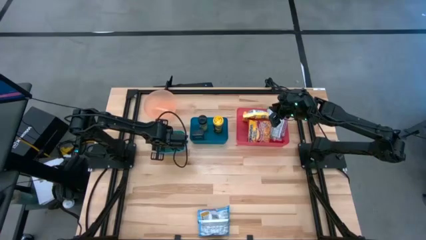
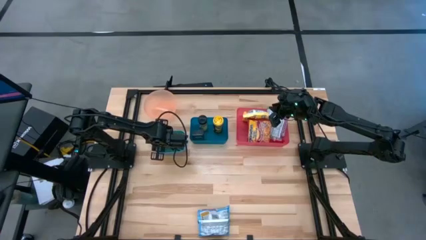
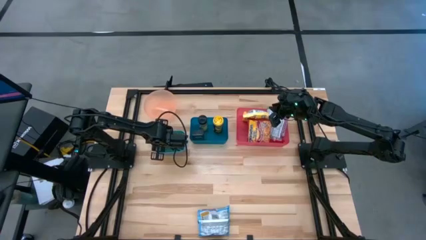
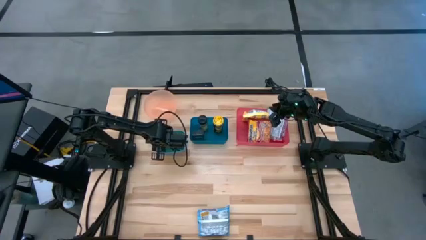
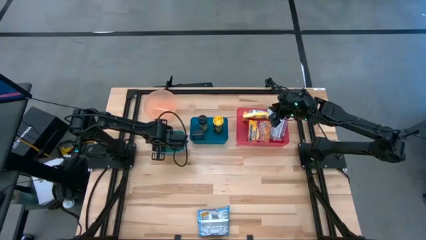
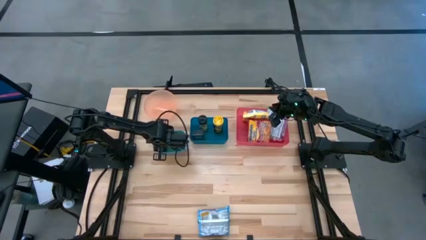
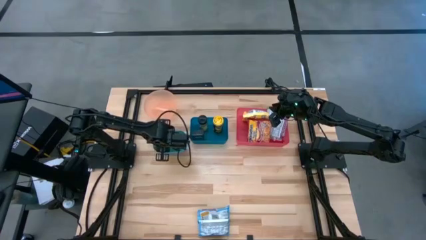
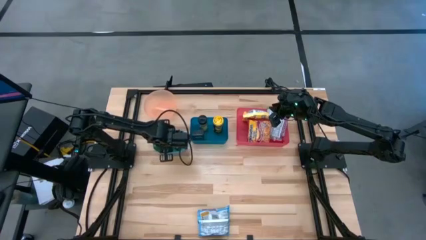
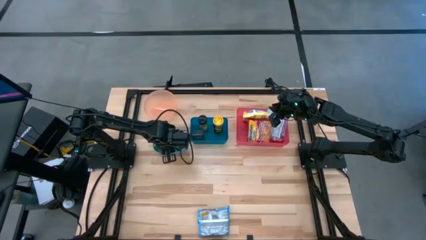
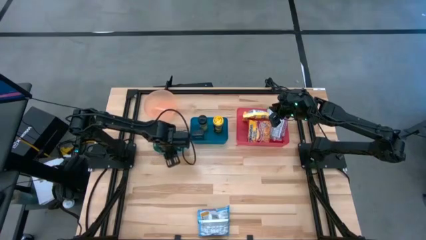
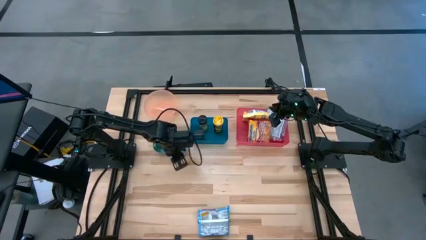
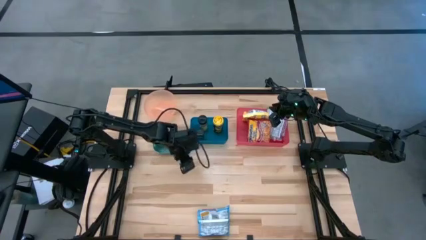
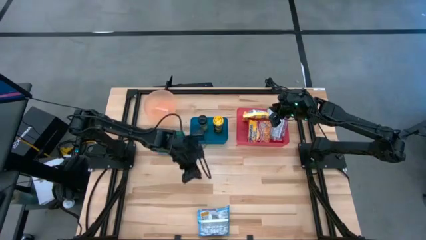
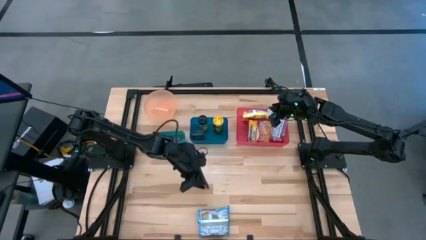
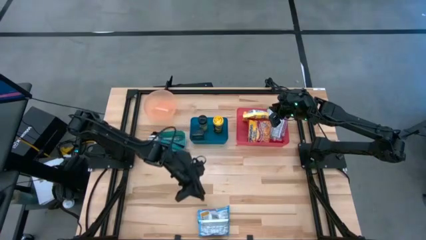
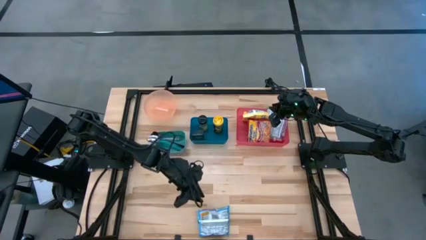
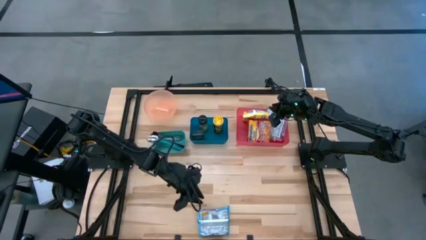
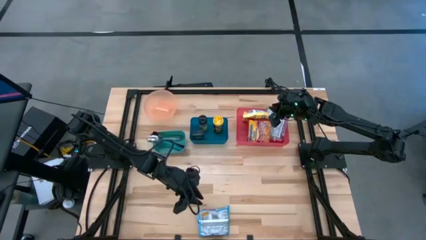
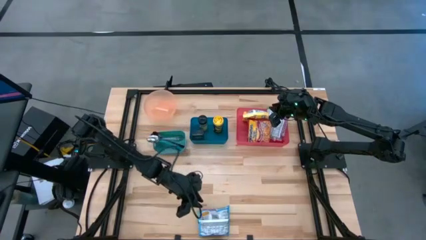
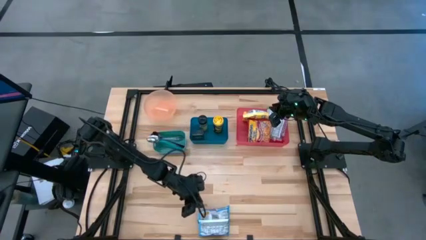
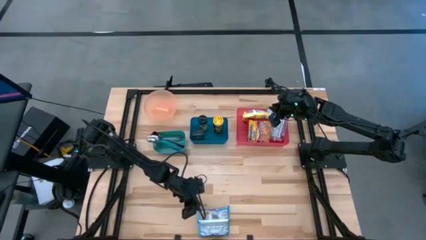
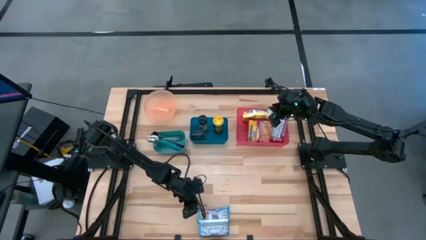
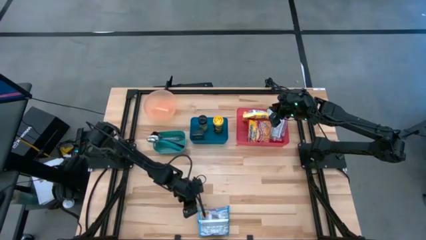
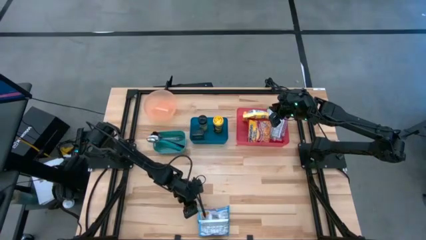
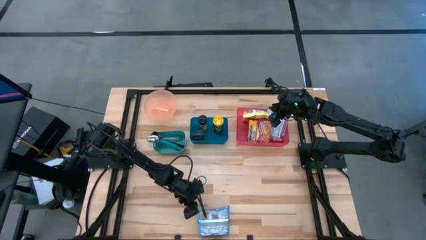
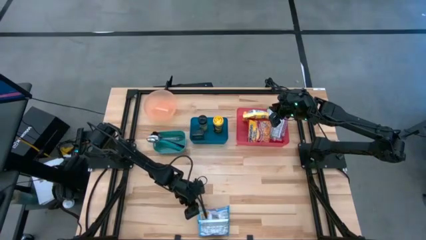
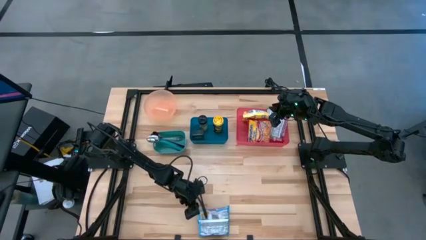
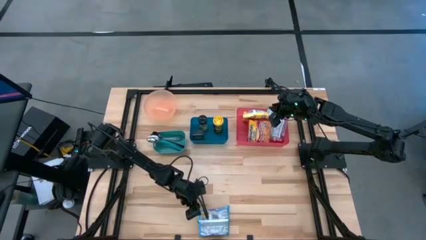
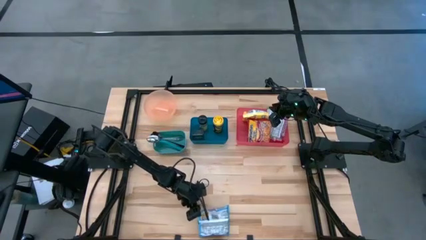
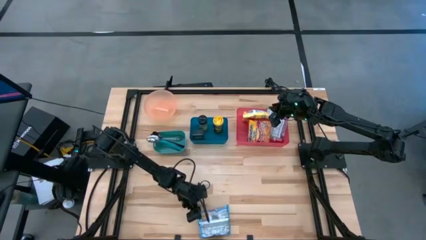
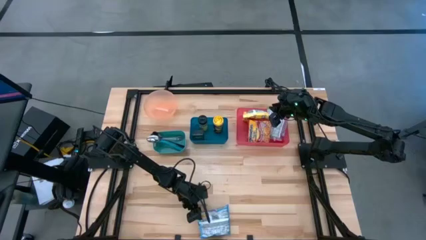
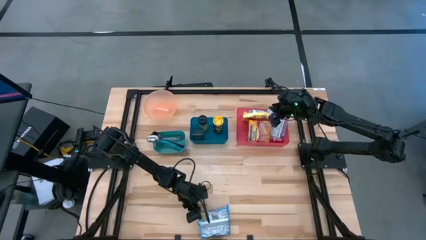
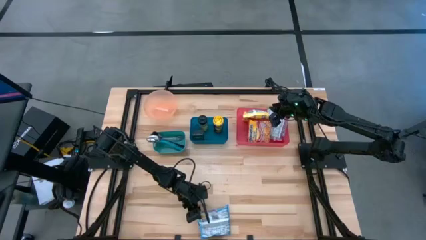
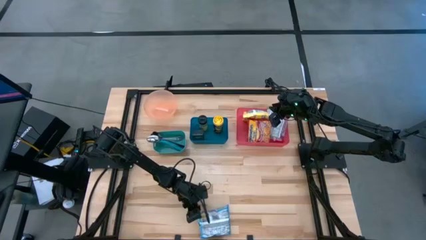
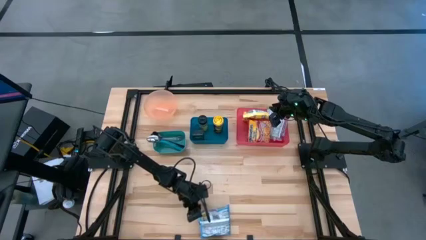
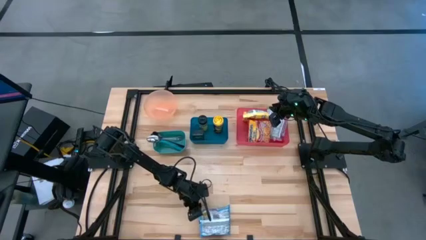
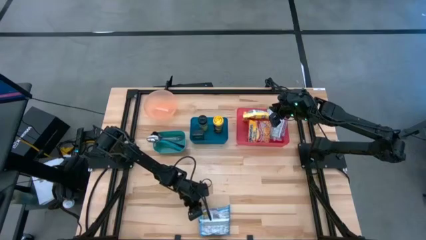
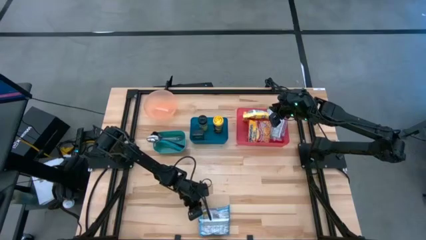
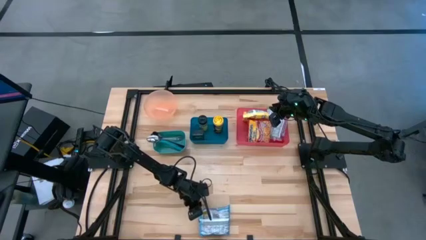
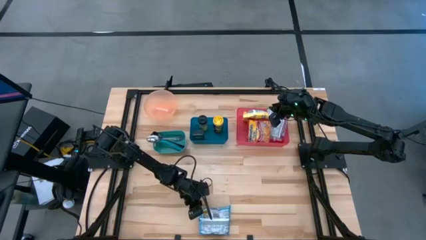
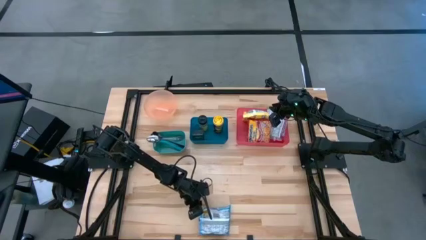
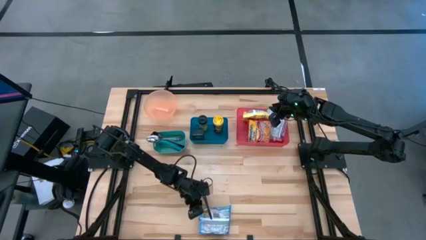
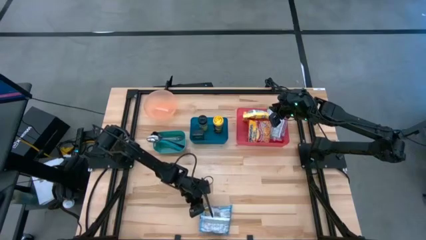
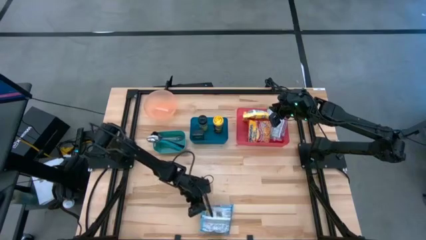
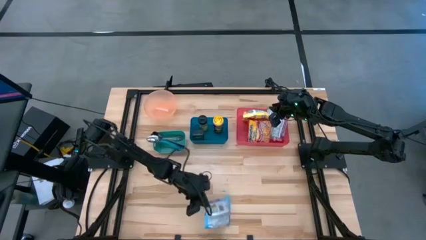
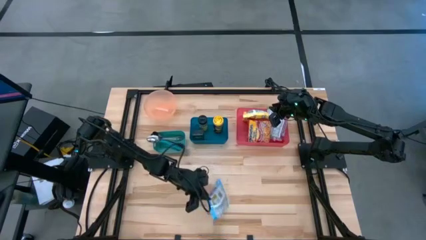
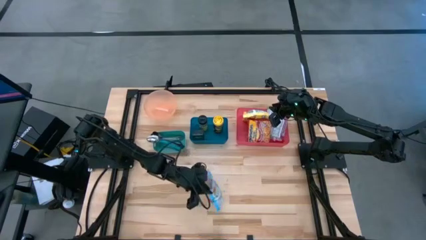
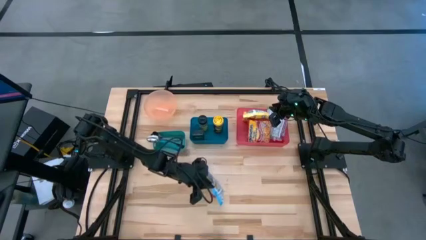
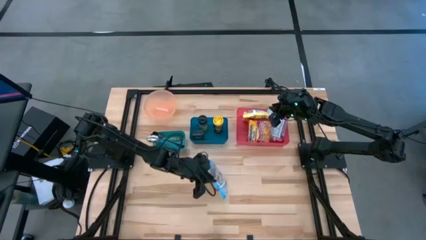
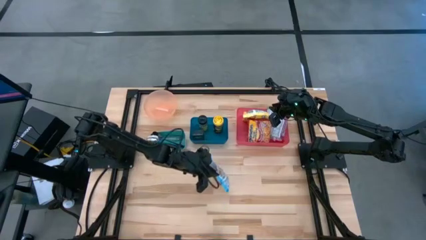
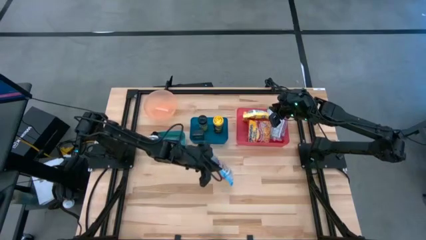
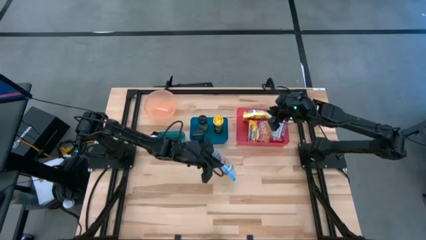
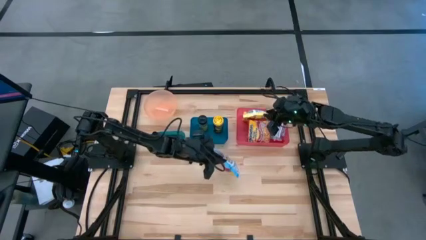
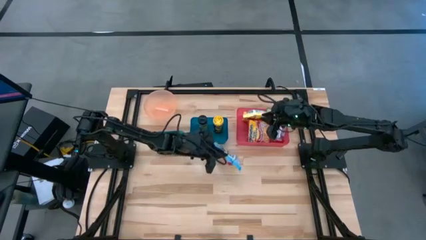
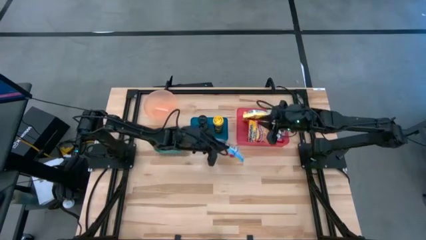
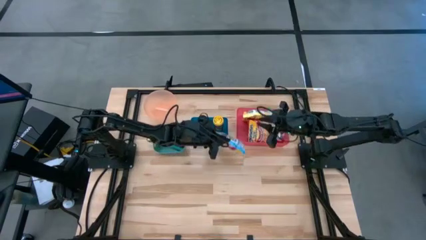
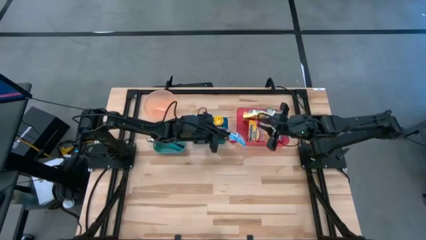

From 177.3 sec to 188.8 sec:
Task: Pick & Place Food Item
Put the light blue noodle pack into the pink bin

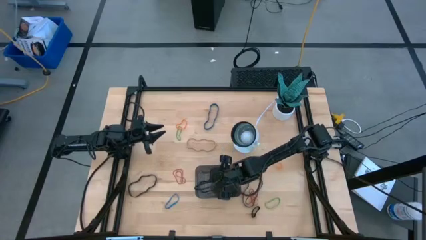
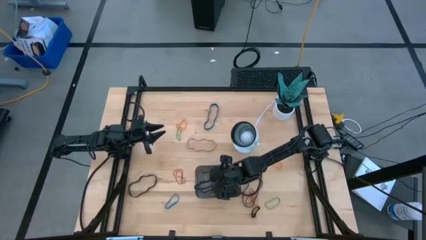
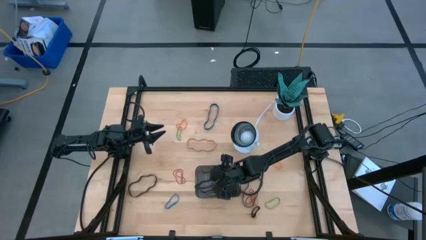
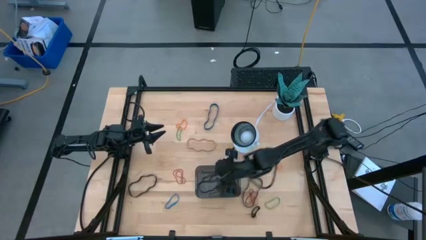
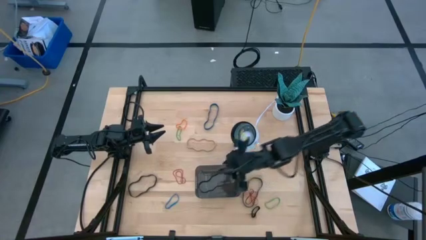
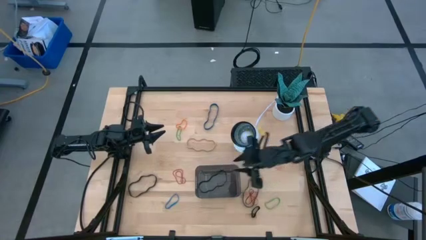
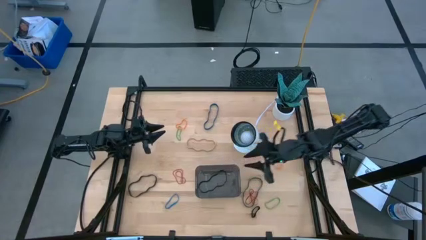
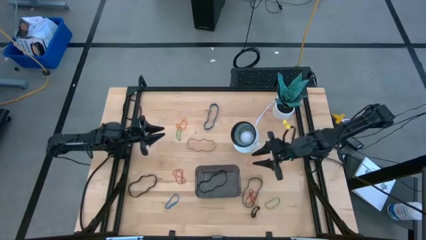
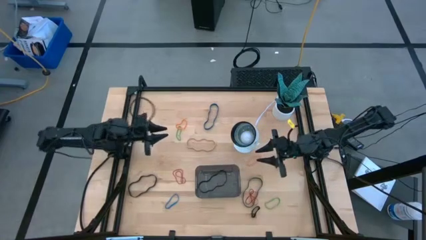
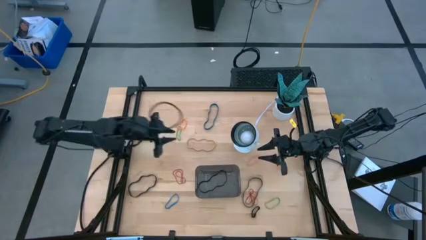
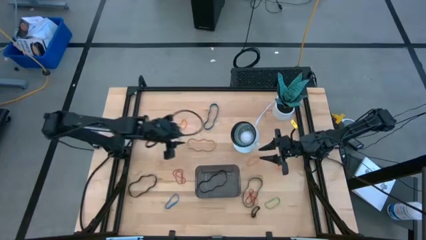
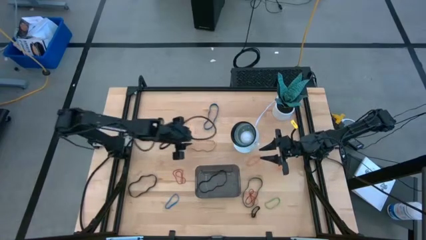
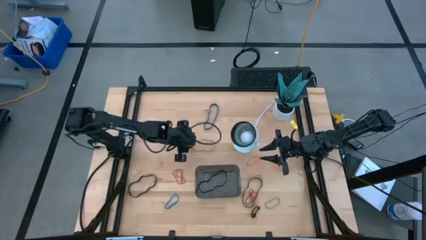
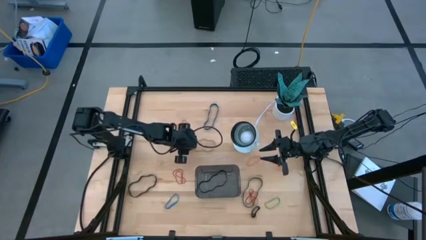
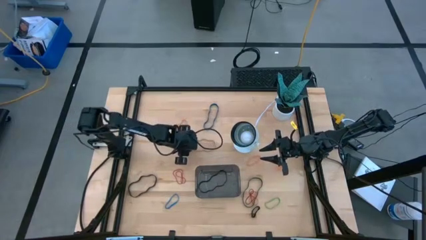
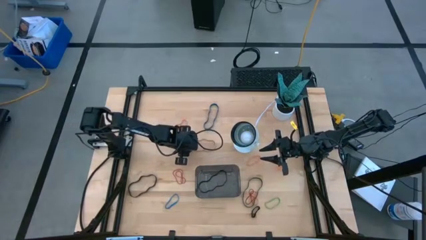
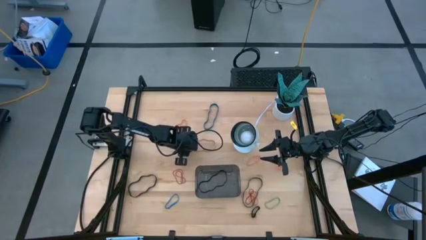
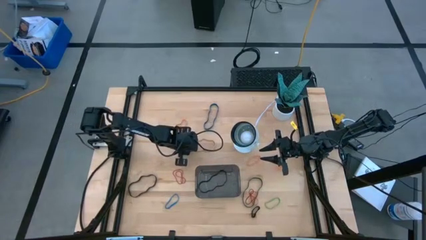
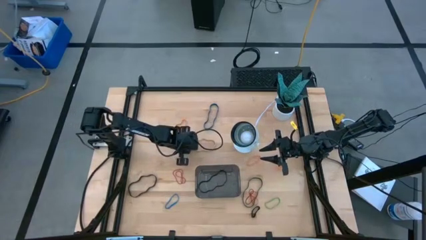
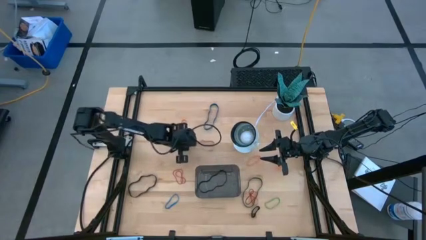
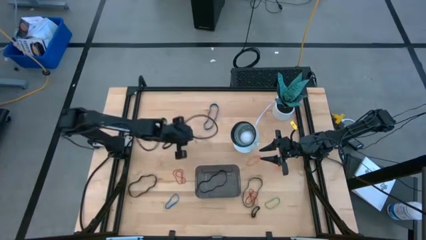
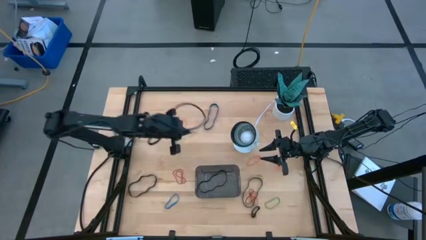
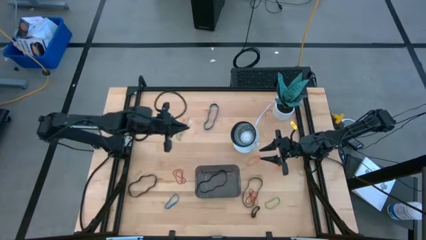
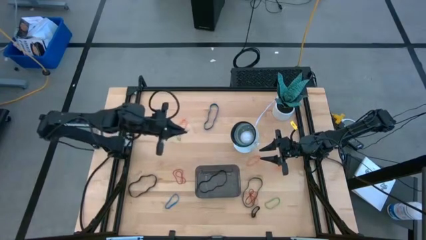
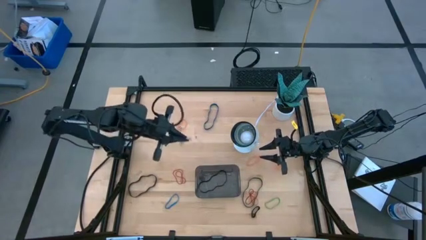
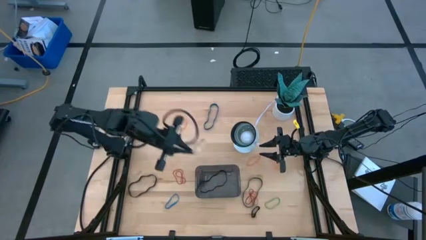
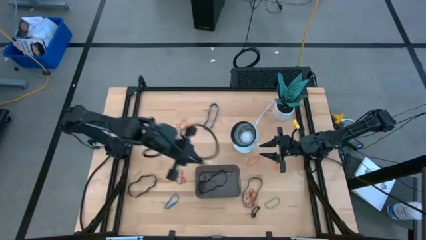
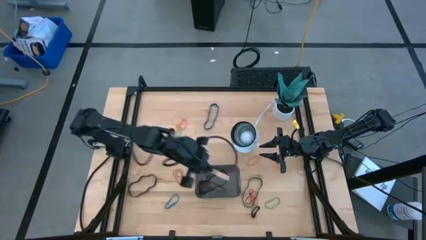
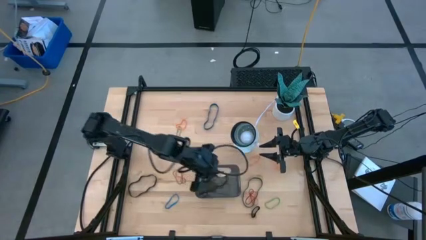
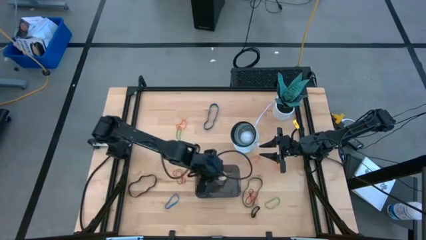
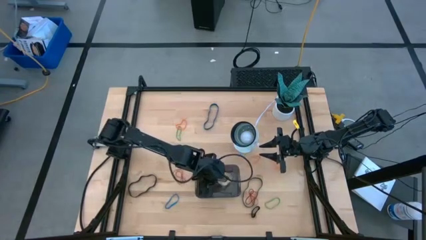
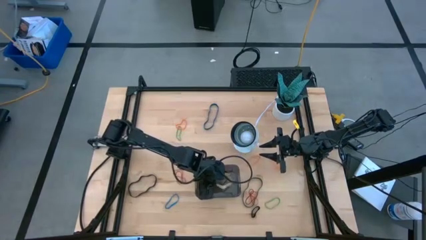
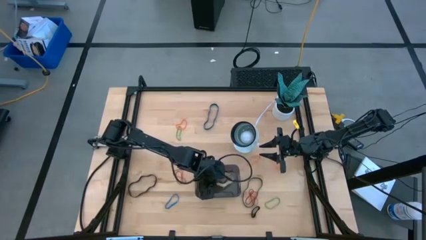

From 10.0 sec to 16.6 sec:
Task: Pick and place rubber bands into bin
Put the brown rubber band into the black bin
